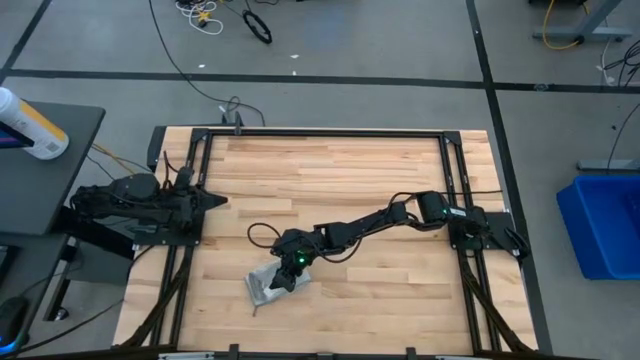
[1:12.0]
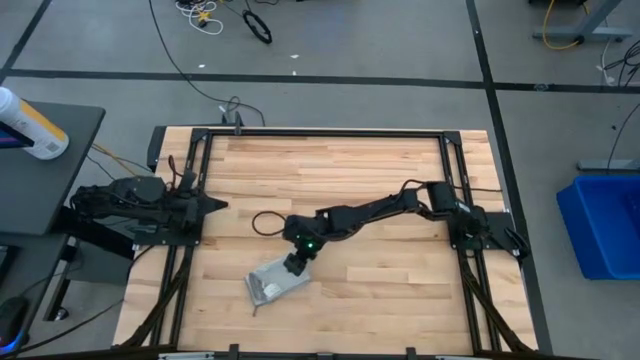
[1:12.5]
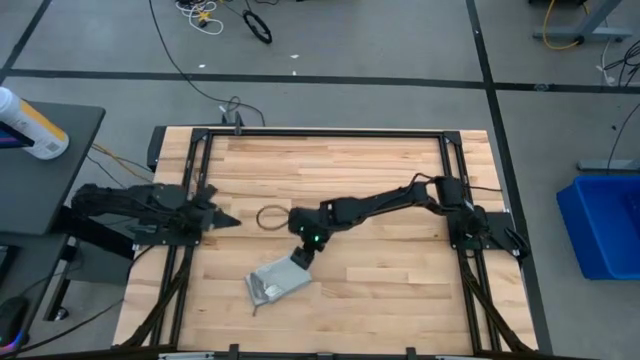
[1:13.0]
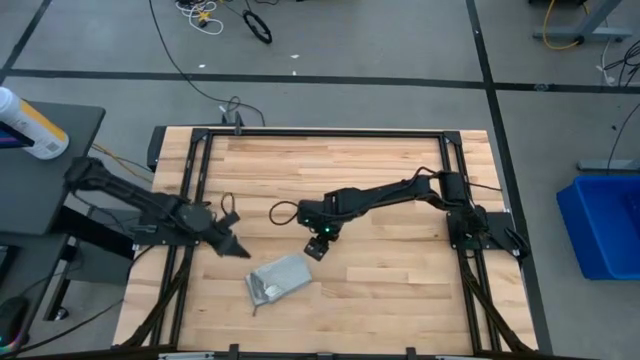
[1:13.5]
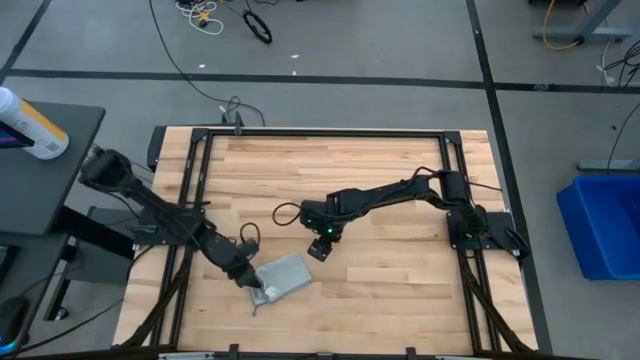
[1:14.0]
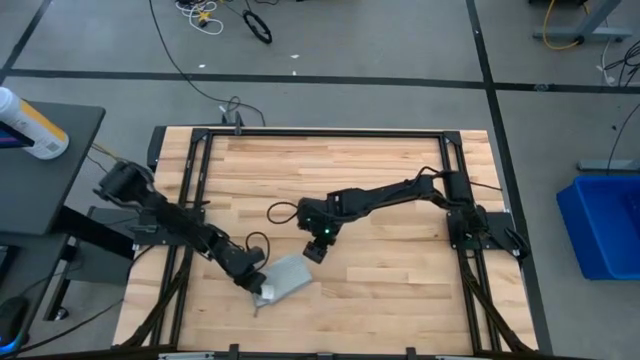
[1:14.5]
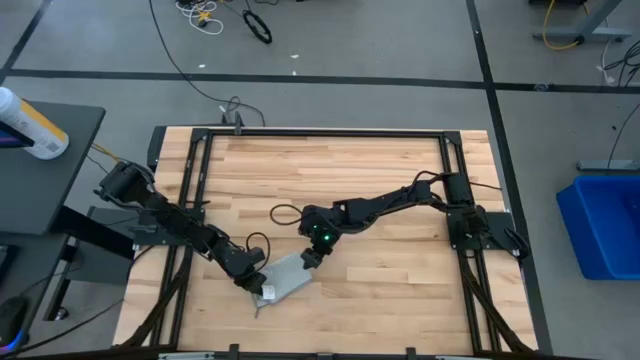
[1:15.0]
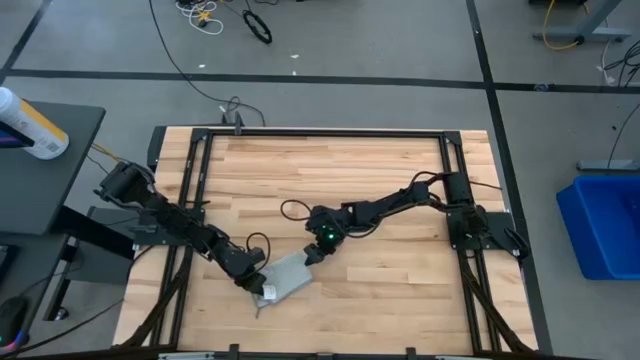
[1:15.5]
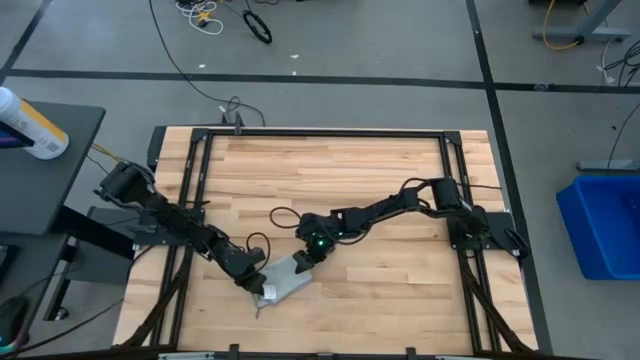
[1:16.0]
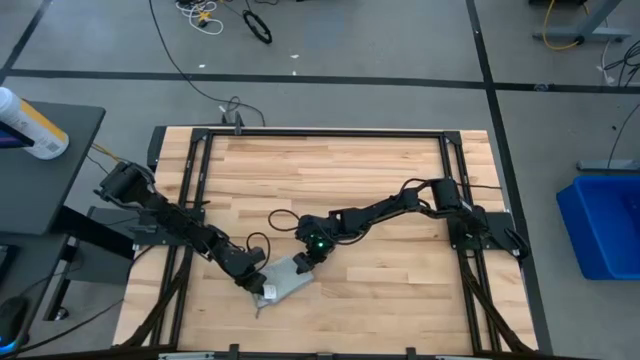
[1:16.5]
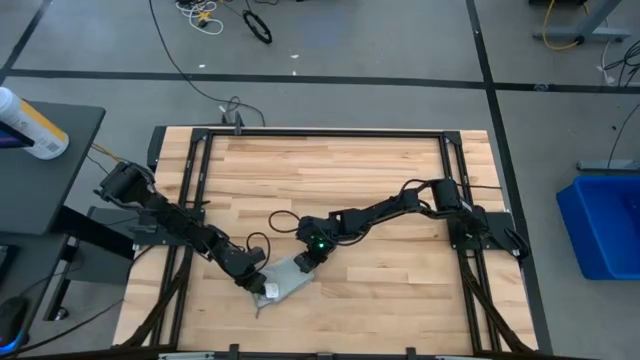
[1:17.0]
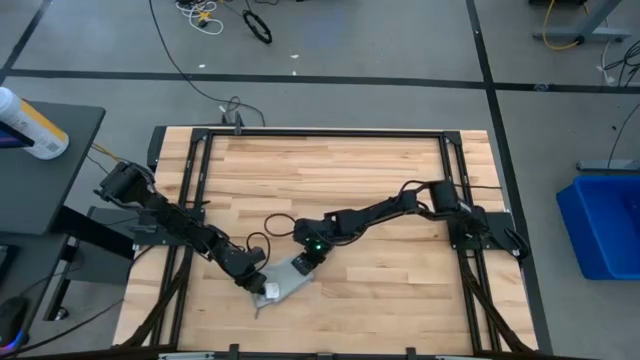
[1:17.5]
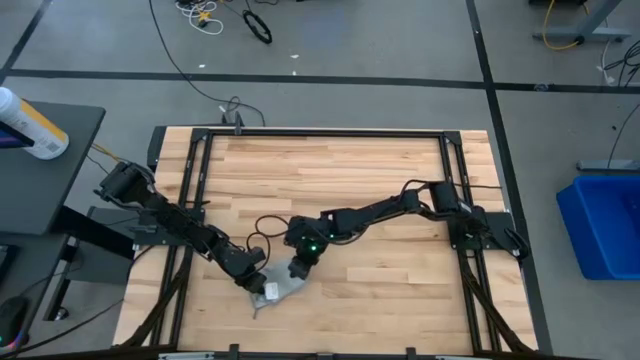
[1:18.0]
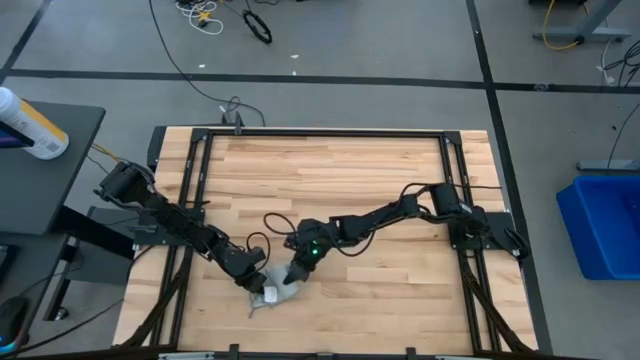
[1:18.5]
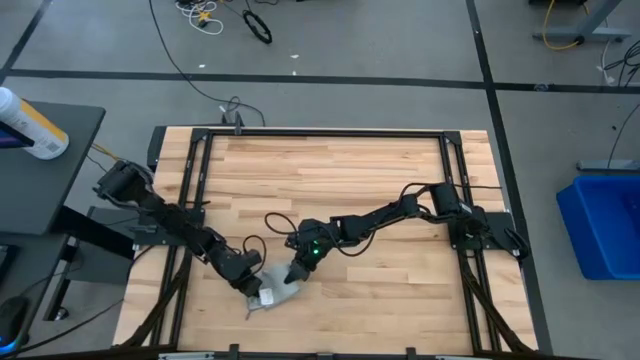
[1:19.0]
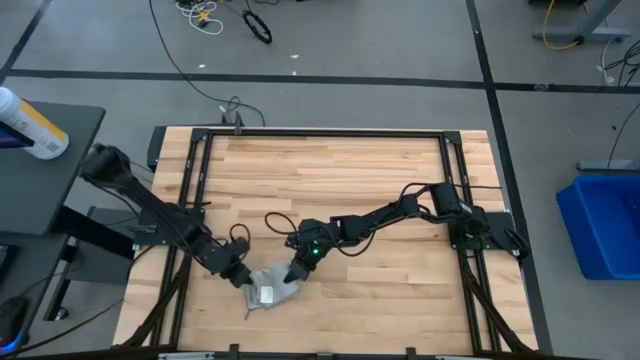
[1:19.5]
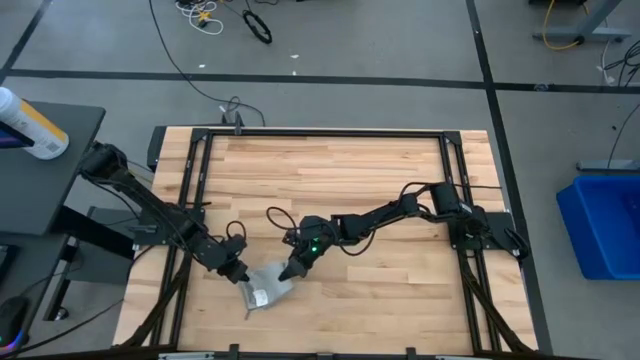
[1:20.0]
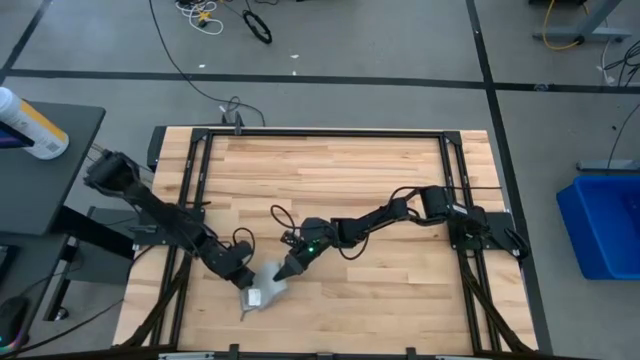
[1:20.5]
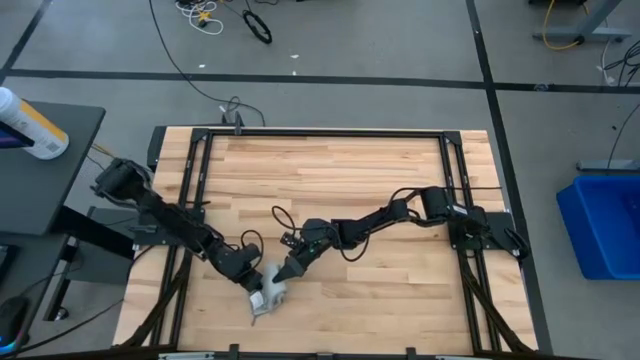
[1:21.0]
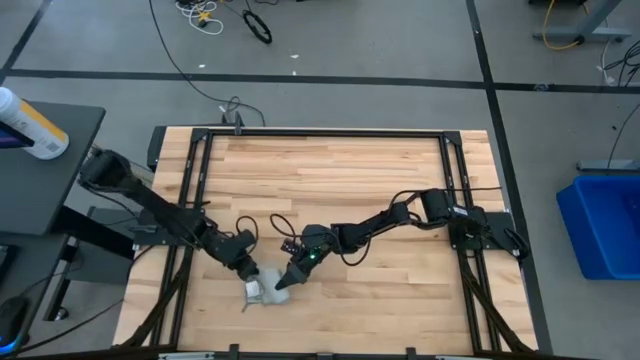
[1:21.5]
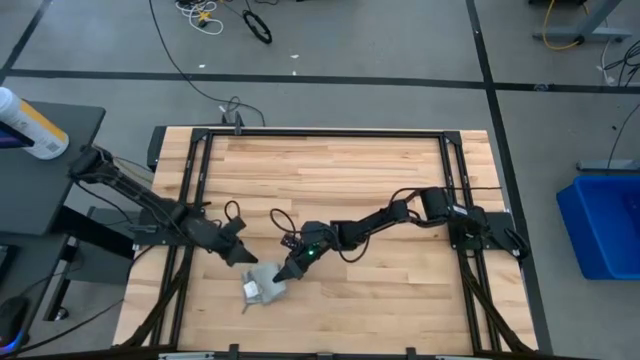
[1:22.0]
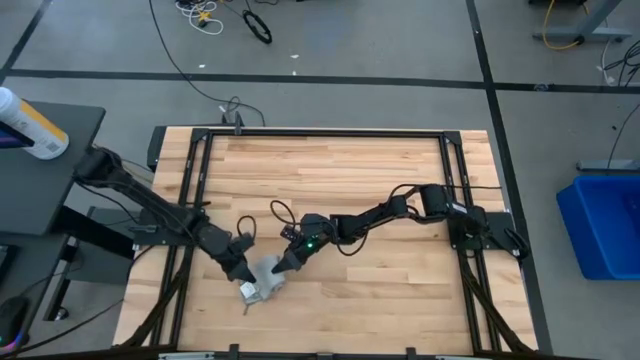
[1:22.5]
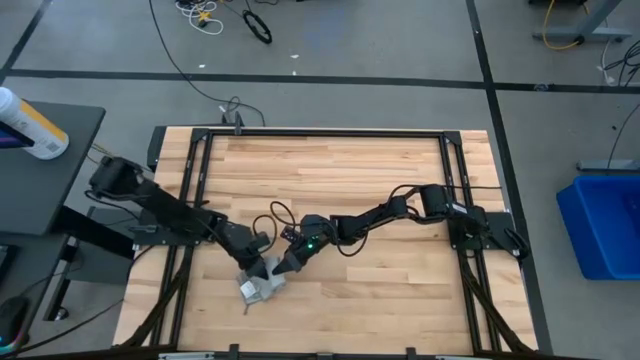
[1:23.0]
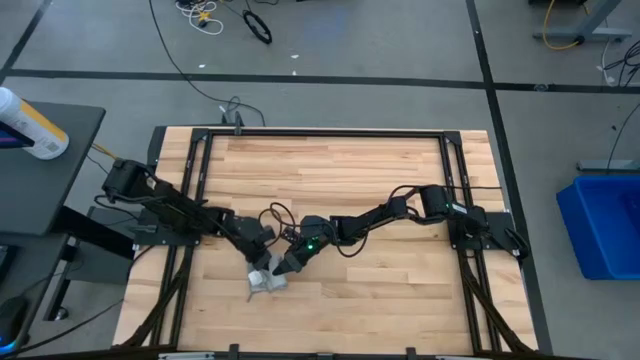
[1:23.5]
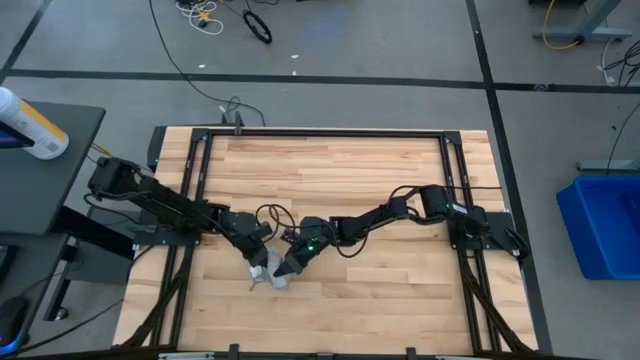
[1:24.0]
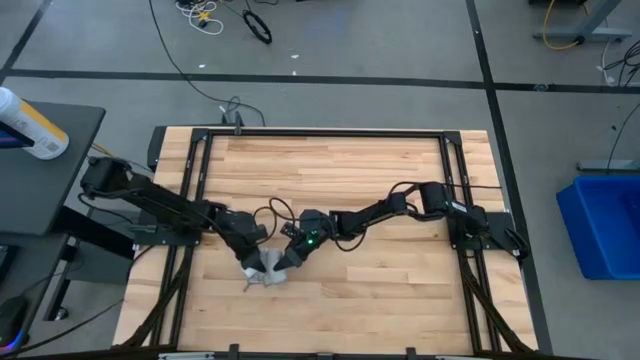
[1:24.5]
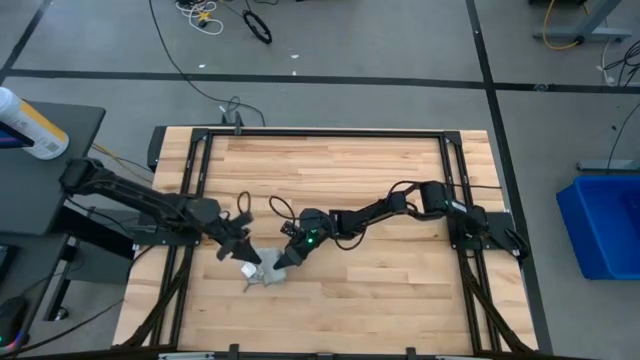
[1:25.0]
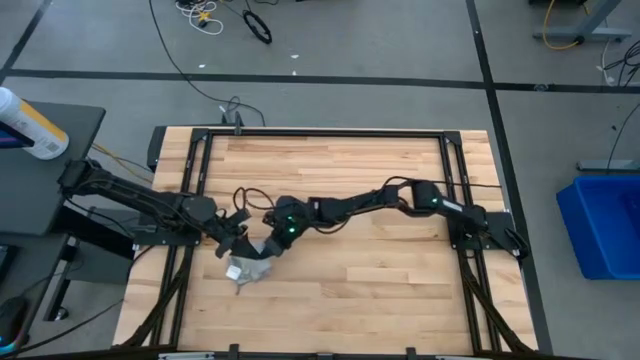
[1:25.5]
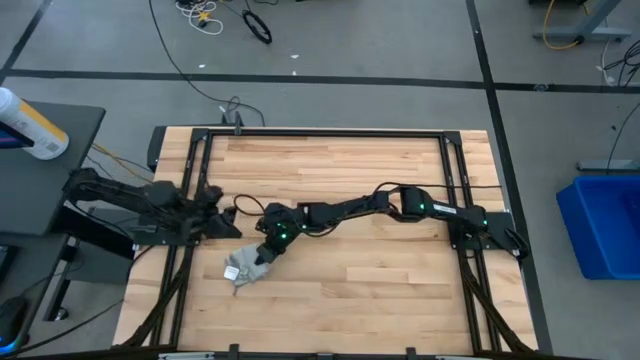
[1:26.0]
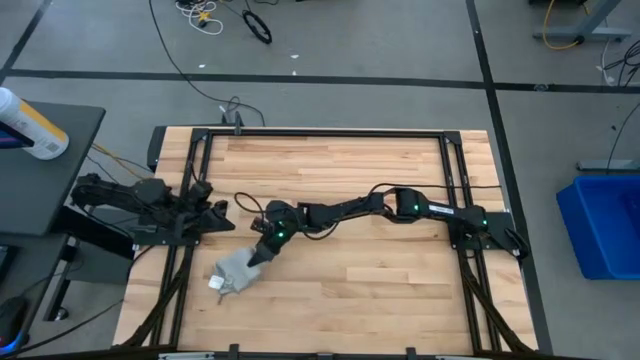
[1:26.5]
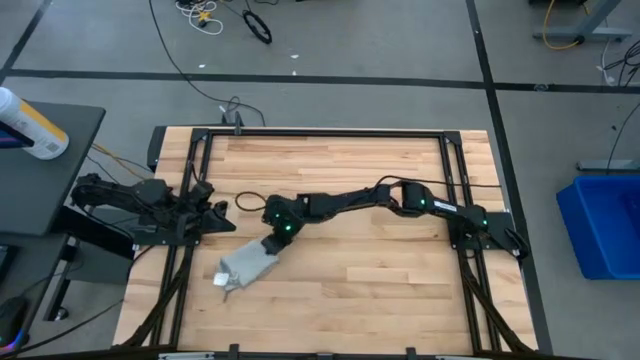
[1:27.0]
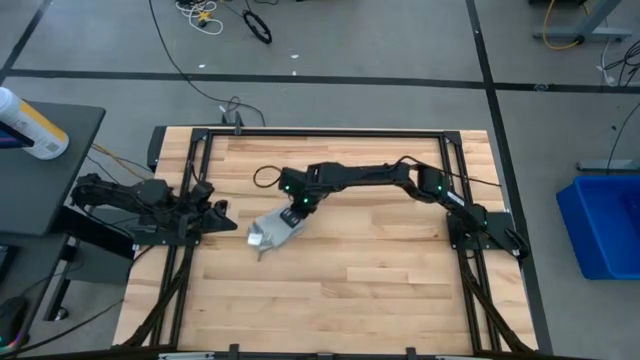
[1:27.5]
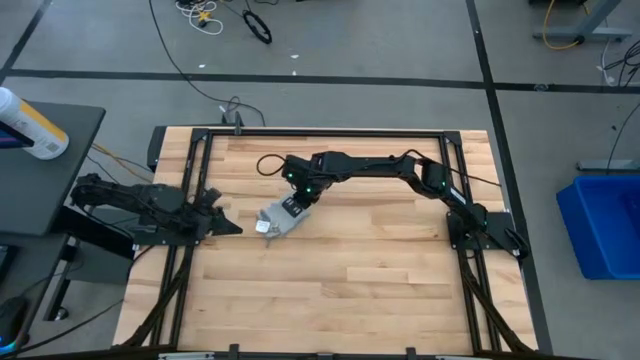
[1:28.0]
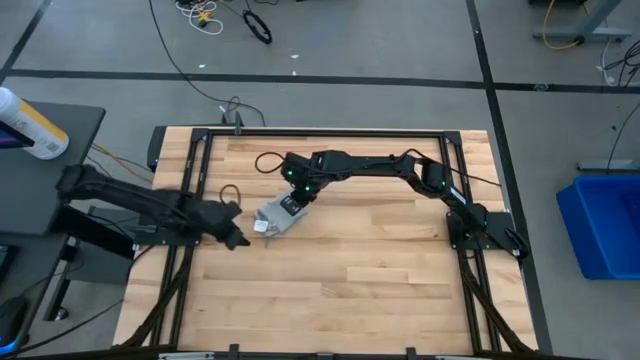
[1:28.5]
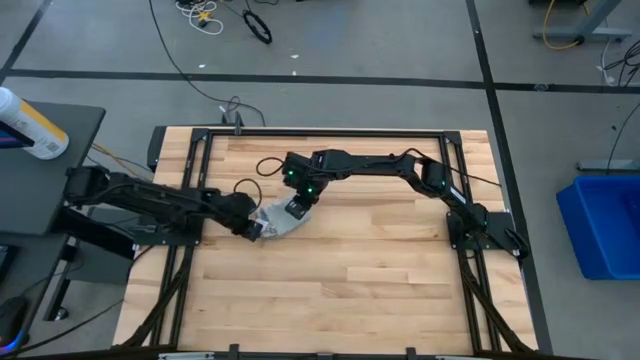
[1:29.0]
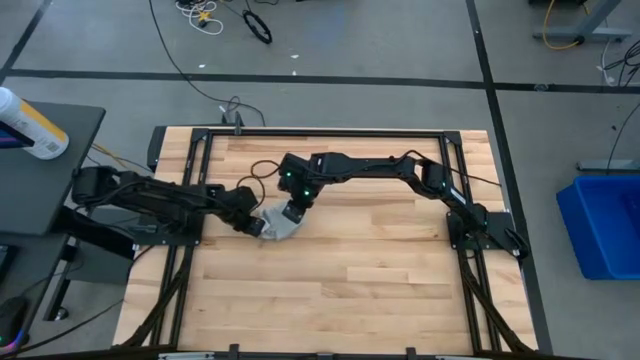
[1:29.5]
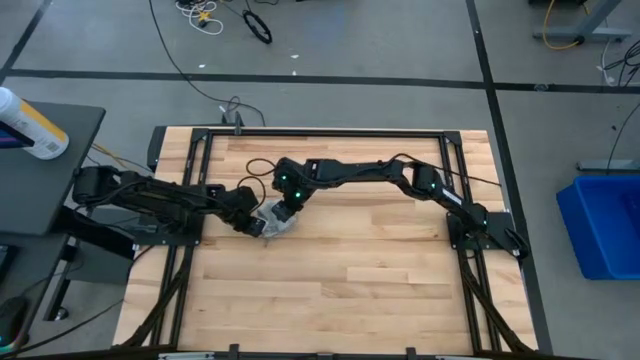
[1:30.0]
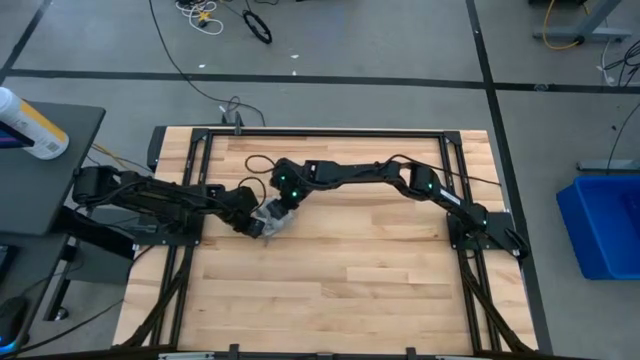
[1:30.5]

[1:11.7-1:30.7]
Task: Fold microfiber towels
Fold the gray microfiber towel
